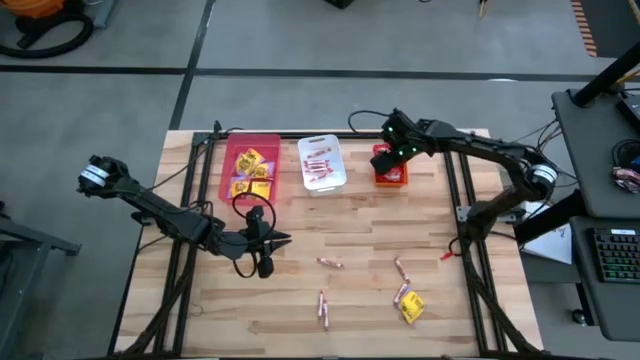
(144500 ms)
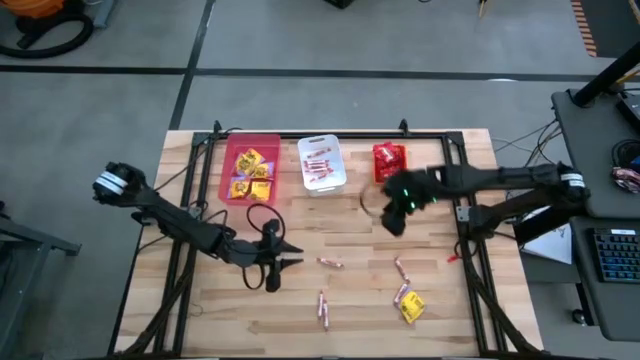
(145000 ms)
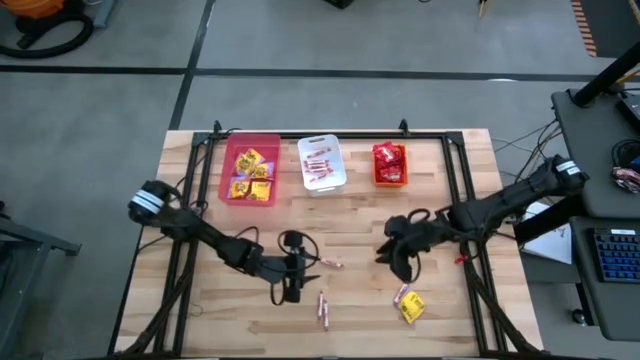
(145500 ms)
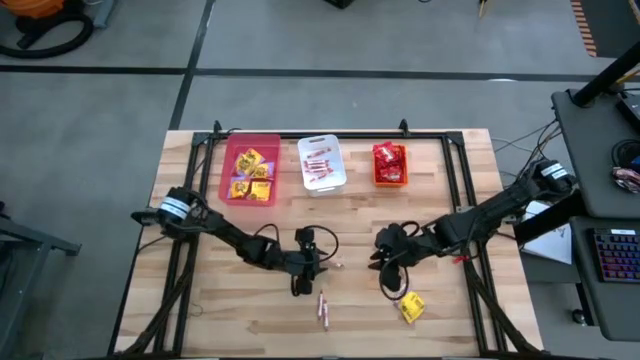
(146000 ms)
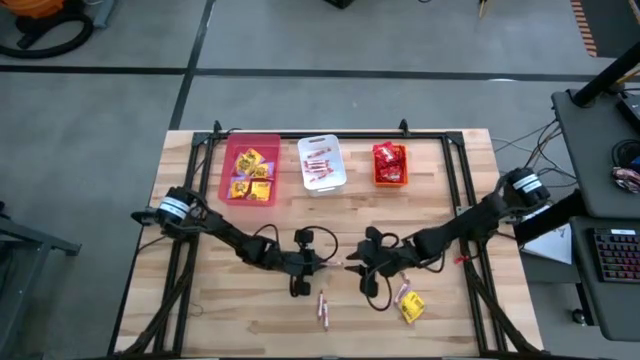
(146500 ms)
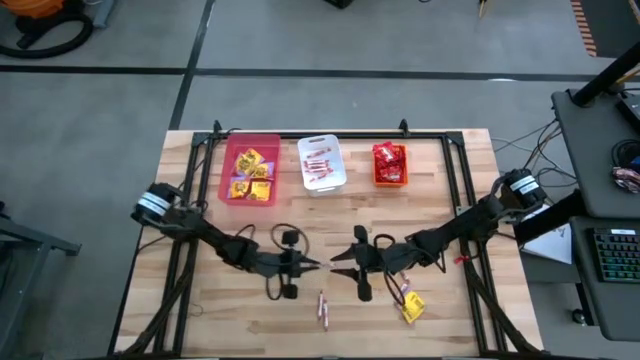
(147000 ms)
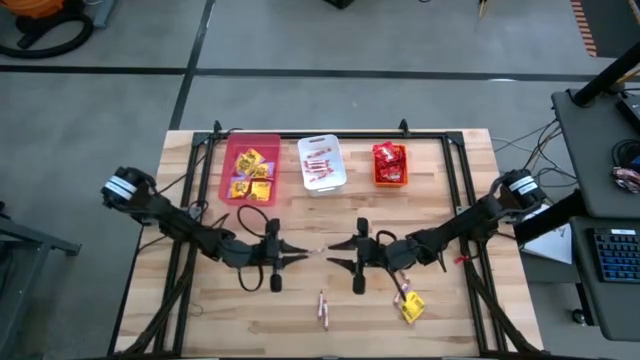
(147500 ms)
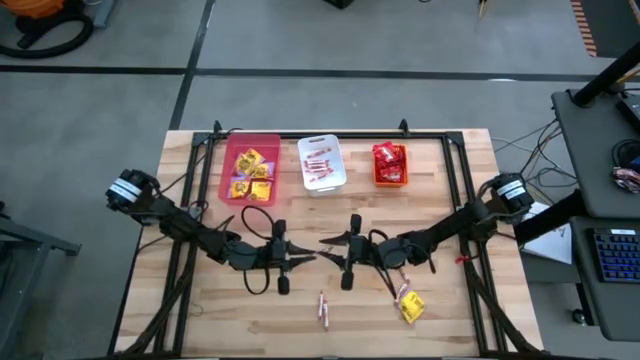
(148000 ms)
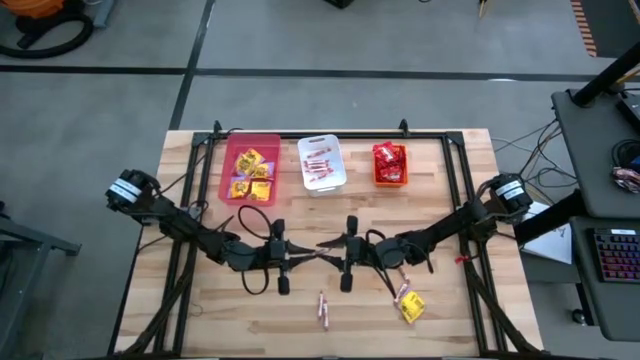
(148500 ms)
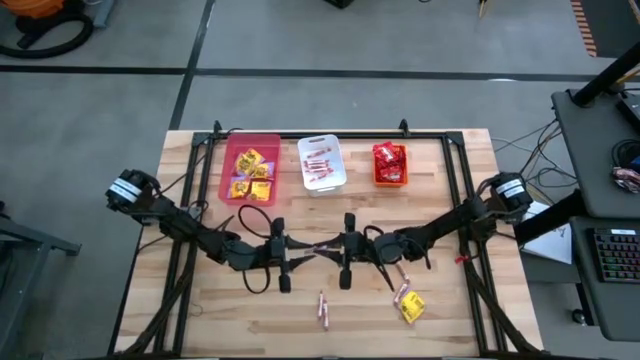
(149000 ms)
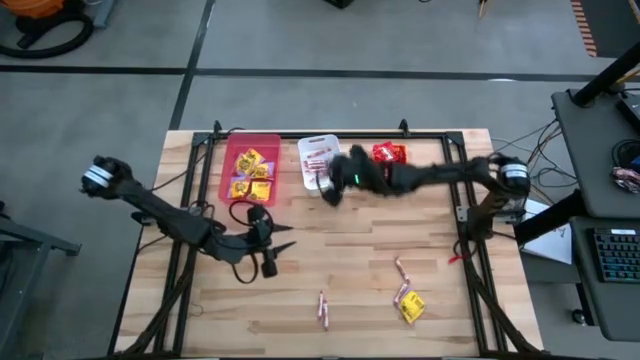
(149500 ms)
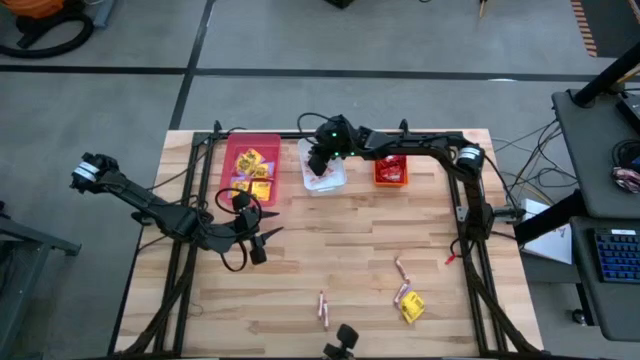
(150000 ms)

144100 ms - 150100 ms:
Task: Sort candy
Put the white candy into the white bin

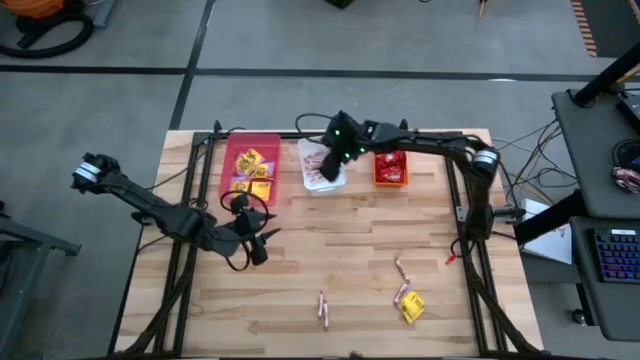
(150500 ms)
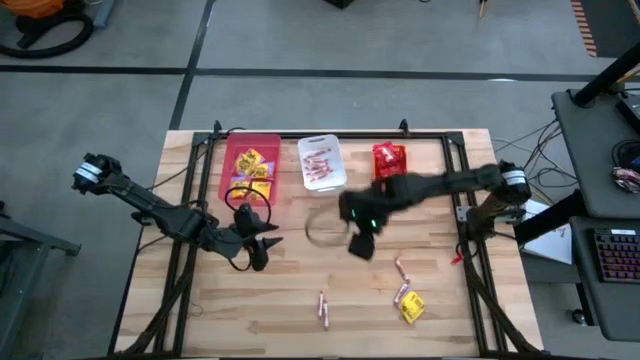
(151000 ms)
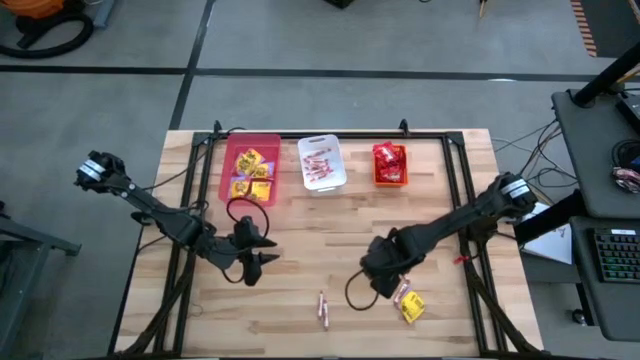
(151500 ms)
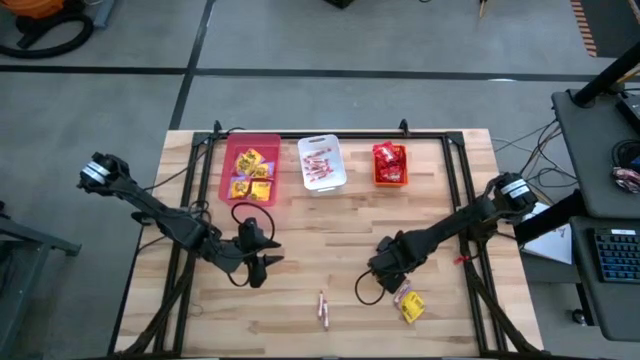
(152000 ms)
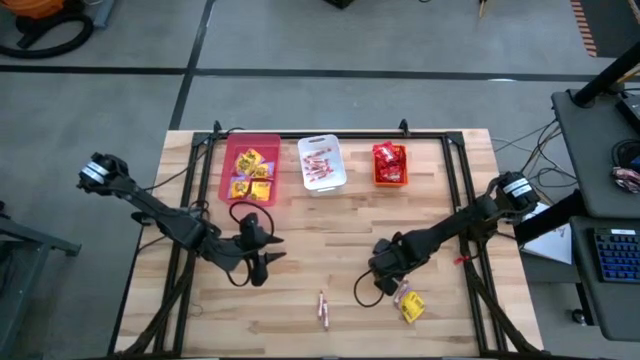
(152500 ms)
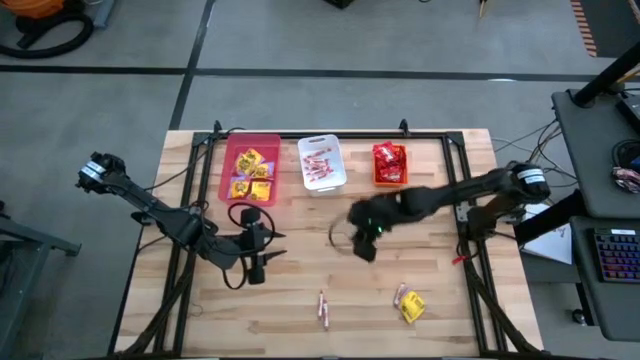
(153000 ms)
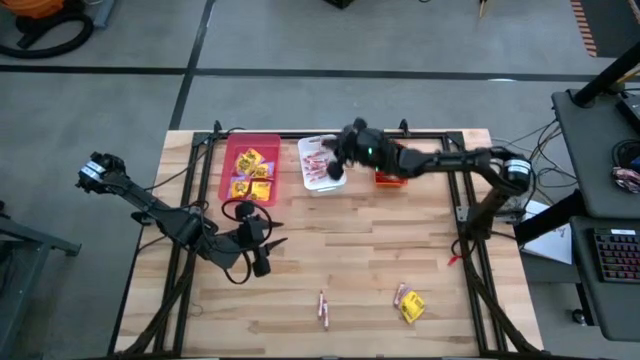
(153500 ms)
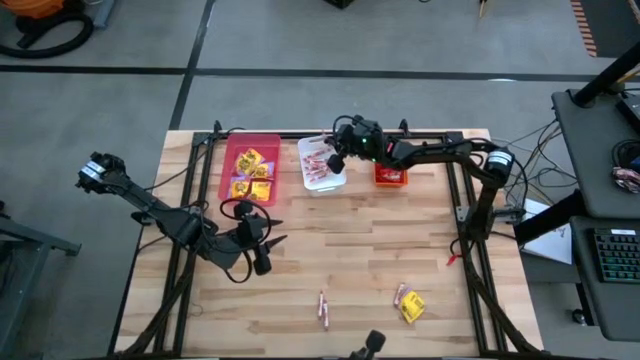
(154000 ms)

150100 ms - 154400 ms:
Put the white candy into the white bin

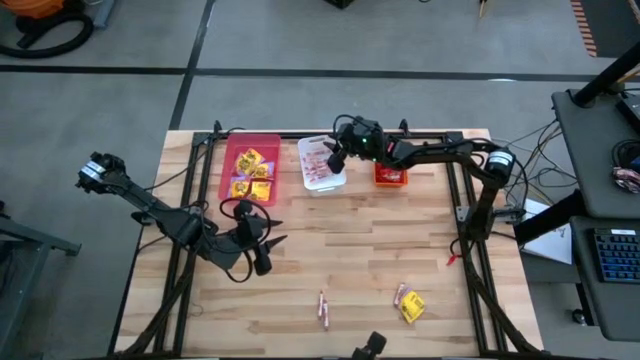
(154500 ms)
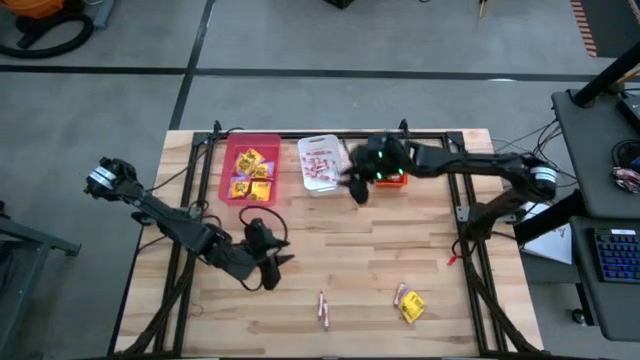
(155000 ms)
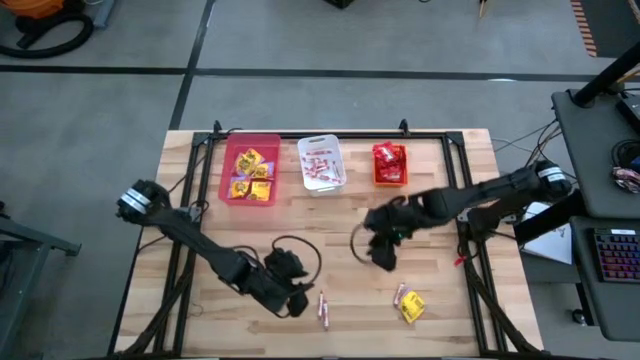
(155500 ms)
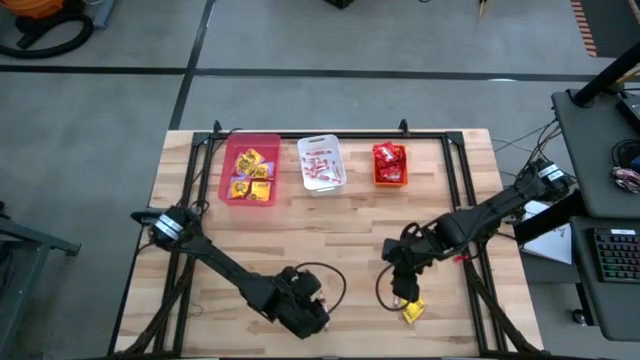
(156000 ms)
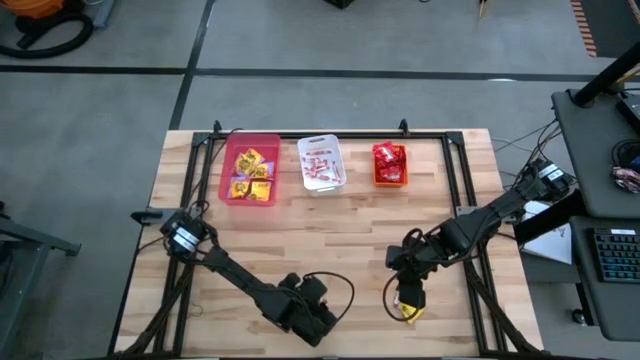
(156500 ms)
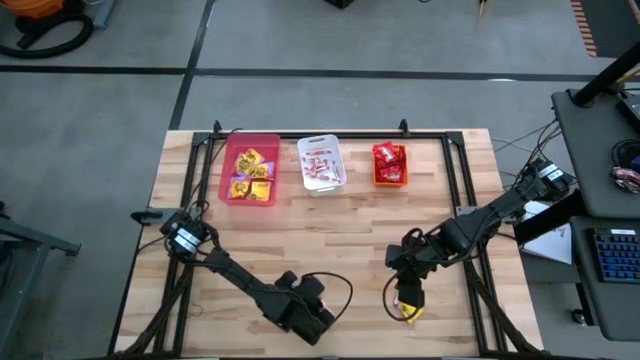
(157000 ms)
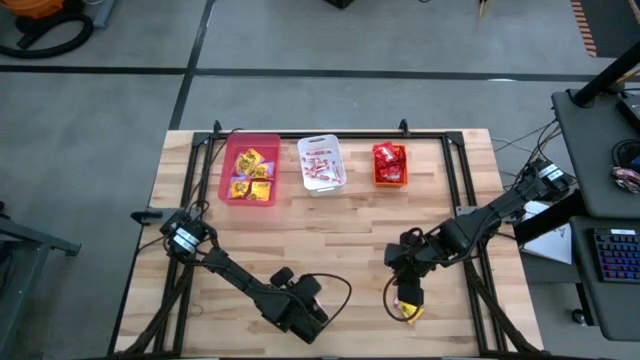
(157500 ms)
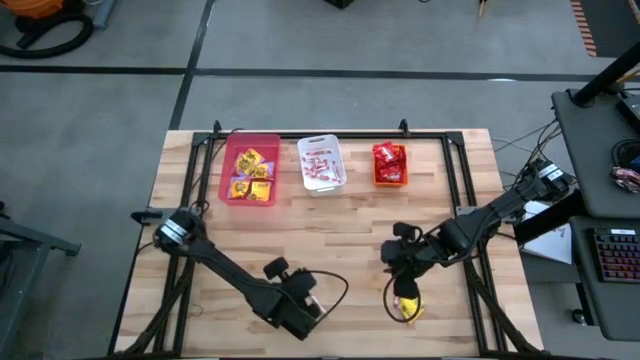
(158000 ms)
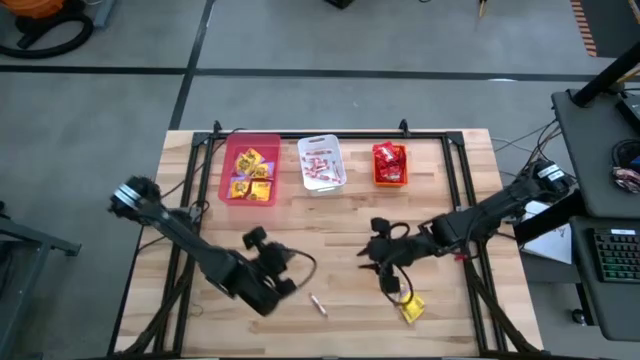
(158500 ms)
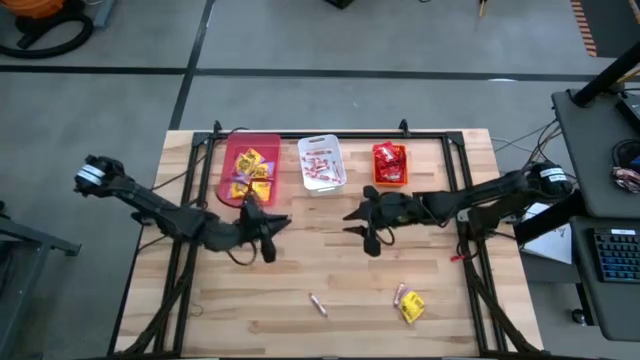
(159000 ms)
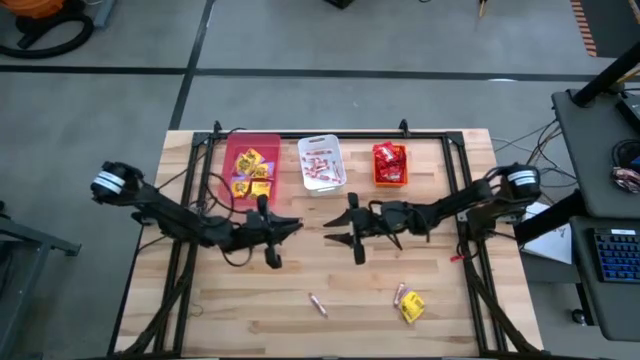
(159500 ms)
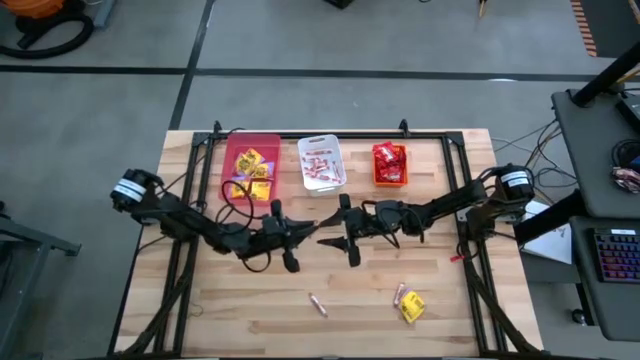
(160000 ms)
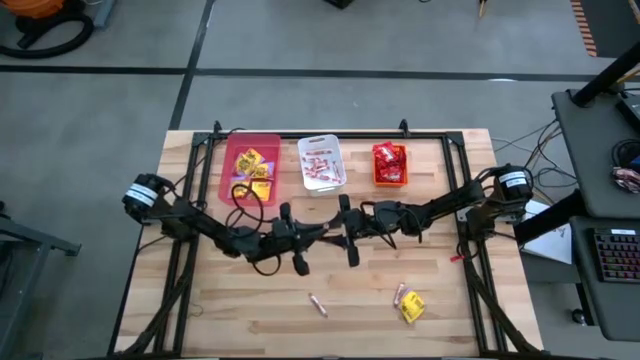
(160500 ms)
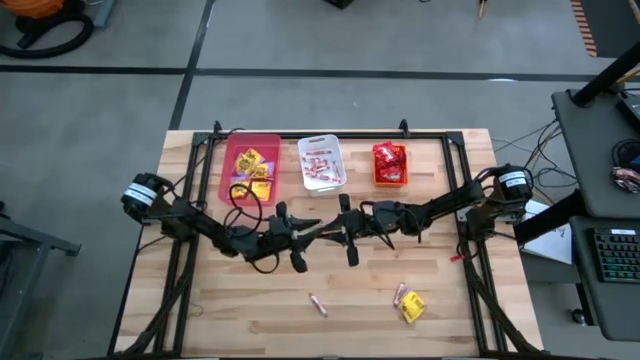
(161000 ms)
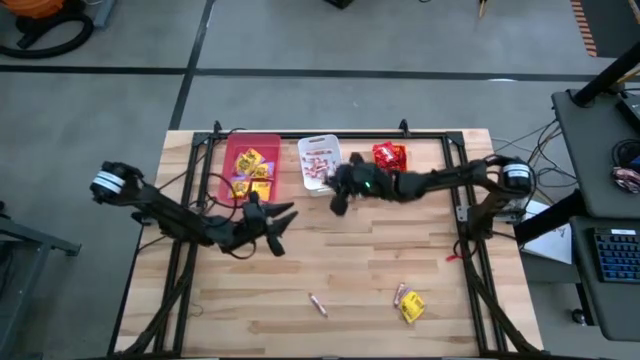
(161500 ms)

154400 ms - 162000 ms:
Put the white candy into the white bin

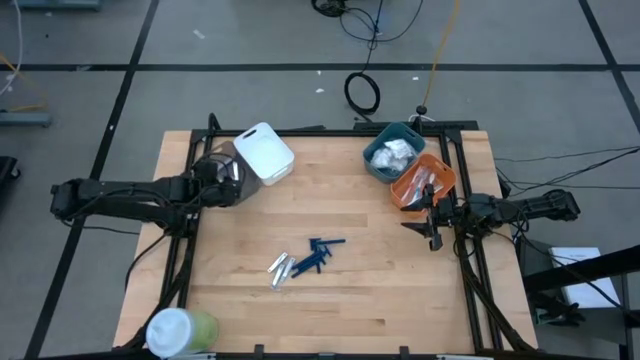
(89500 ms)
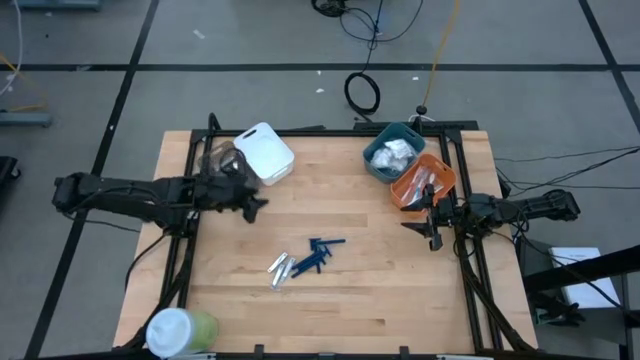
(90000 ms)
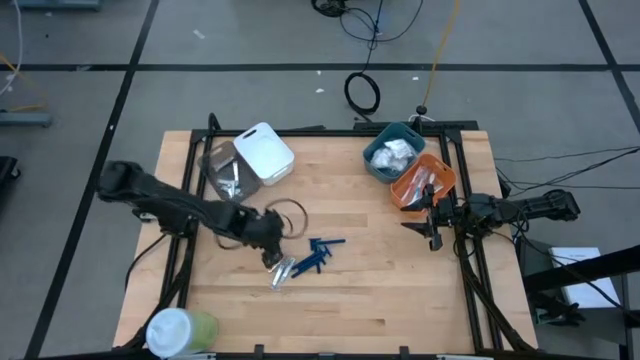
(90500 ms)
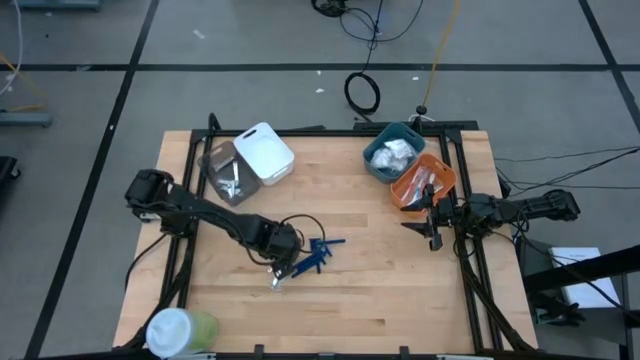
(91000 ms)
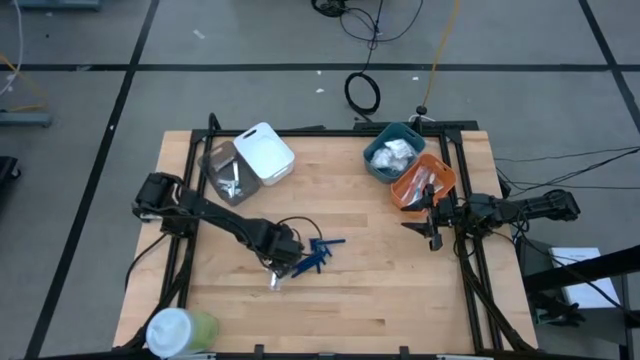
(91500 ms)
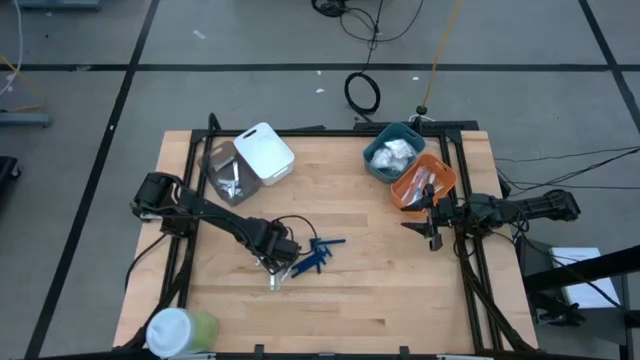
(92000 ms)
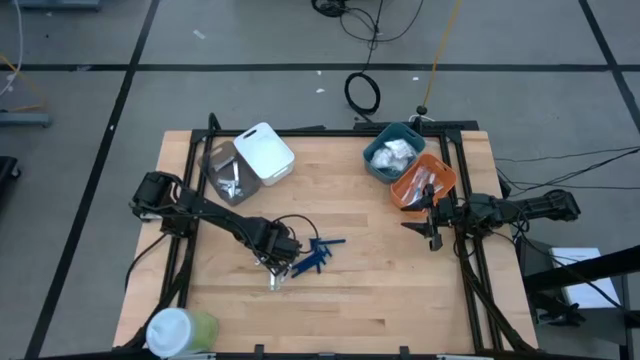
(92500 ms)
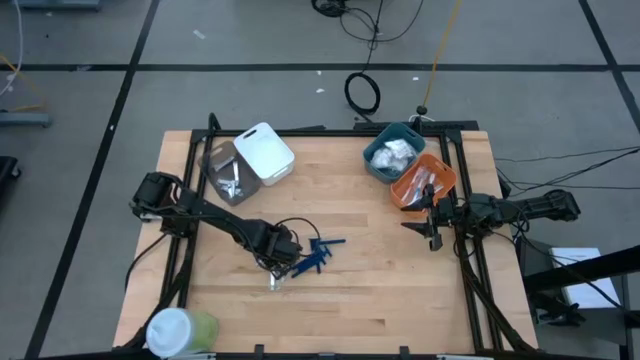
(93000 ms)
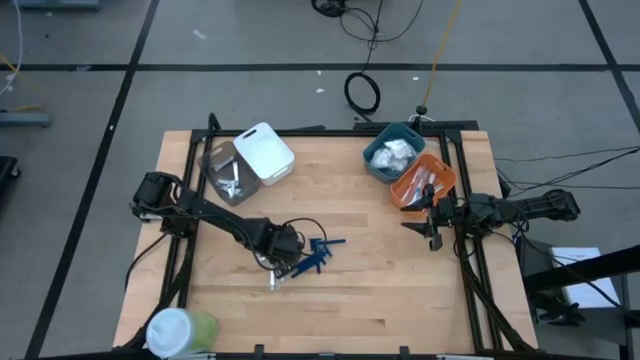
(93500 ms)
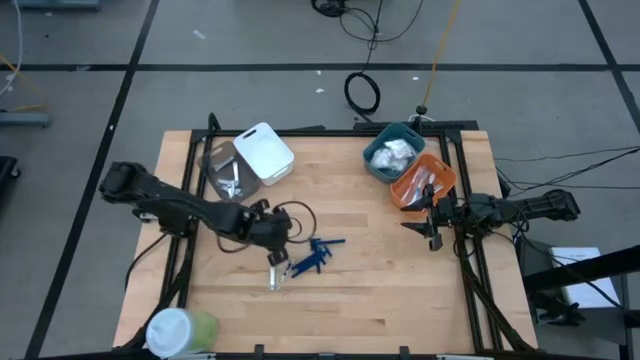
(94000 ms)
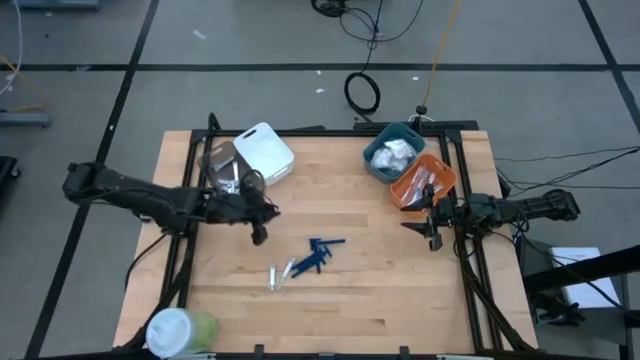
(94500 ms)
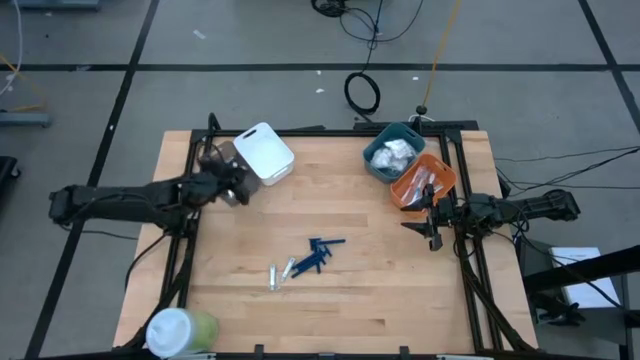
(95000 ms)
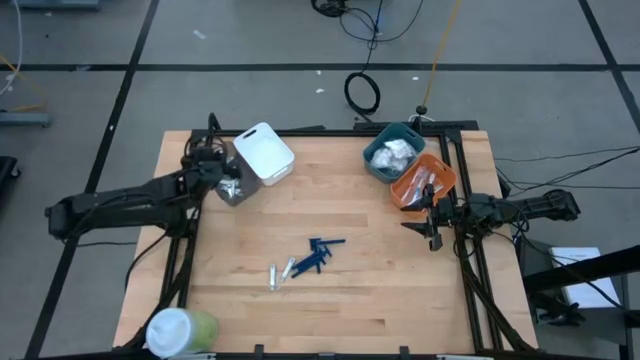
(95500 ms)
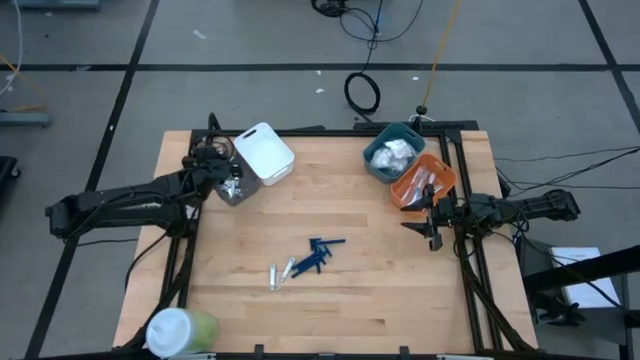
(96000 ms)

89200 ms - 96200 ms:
Task: Pick & Place Travel size toiletries
Put the top silver nail cutter into the black bin
